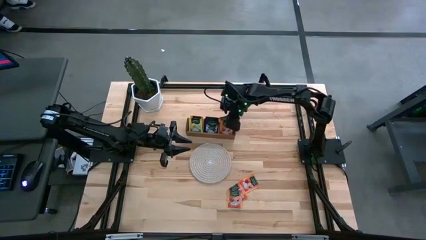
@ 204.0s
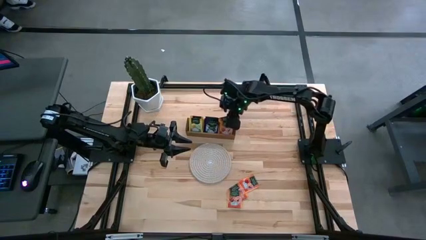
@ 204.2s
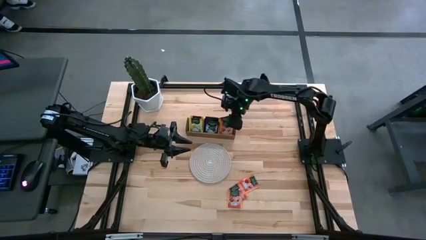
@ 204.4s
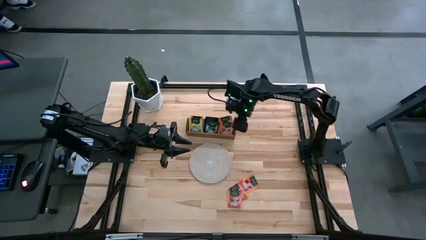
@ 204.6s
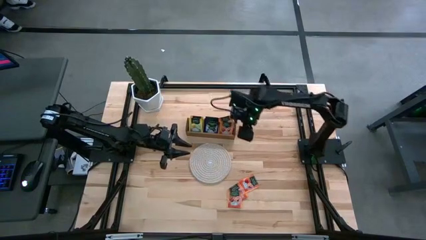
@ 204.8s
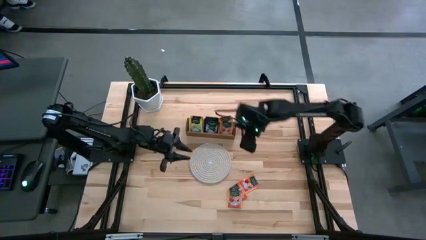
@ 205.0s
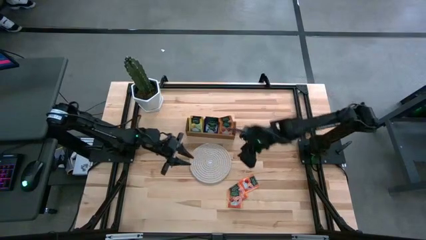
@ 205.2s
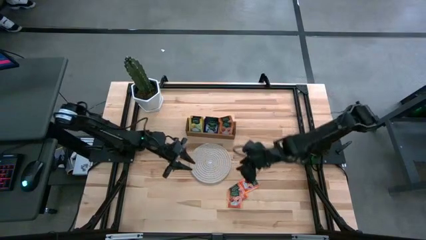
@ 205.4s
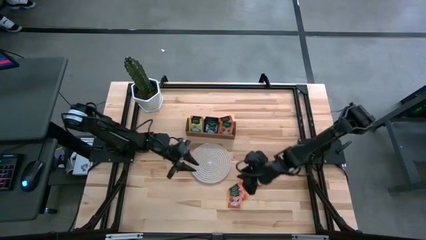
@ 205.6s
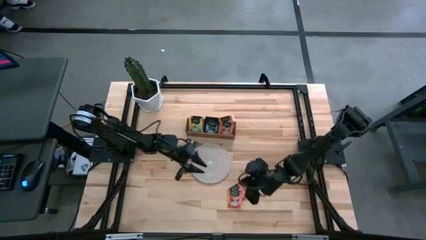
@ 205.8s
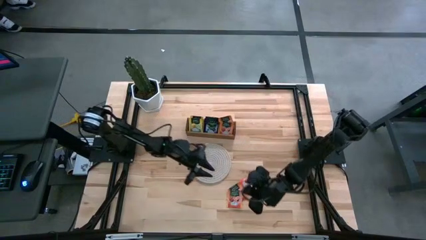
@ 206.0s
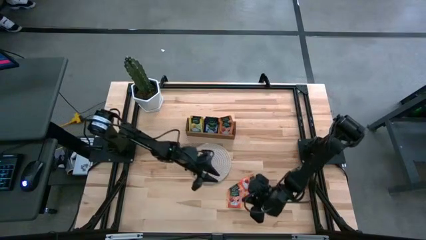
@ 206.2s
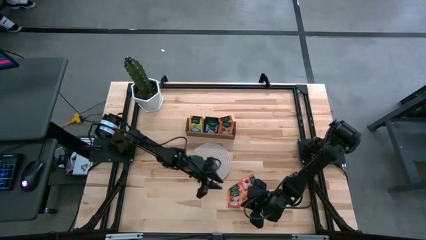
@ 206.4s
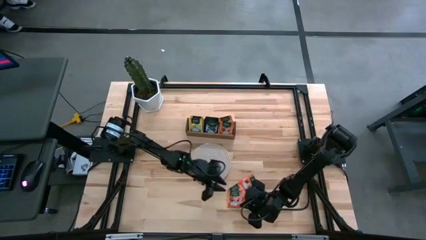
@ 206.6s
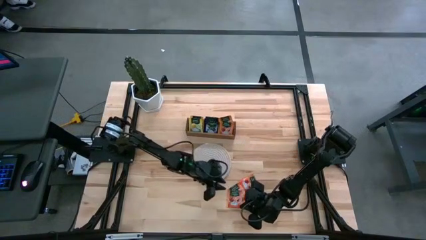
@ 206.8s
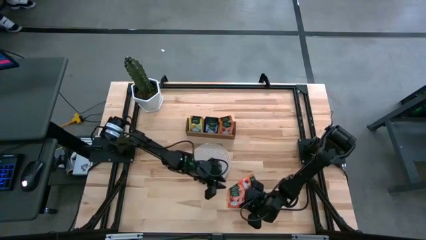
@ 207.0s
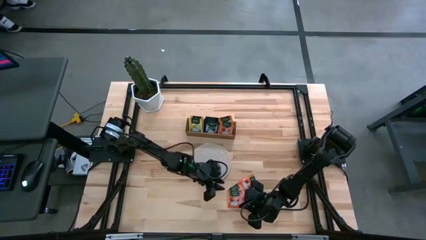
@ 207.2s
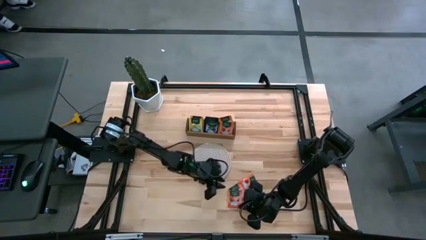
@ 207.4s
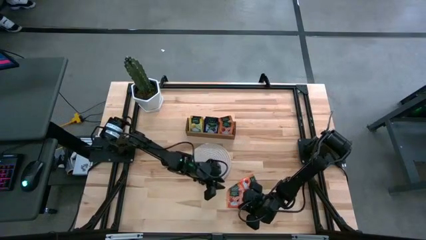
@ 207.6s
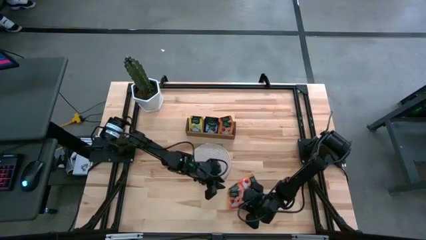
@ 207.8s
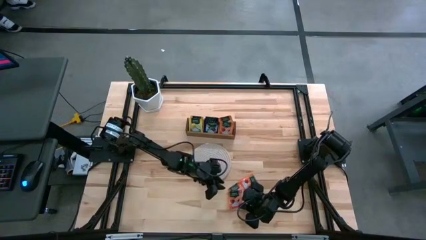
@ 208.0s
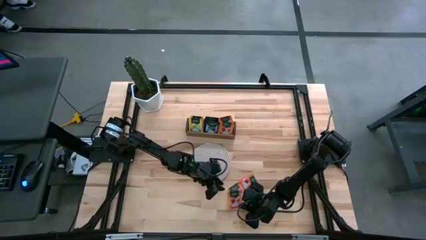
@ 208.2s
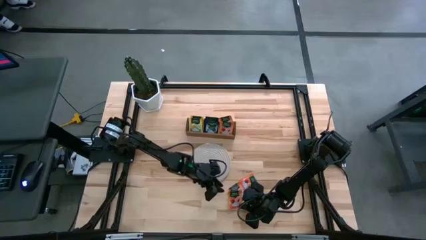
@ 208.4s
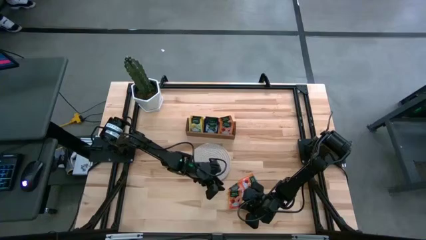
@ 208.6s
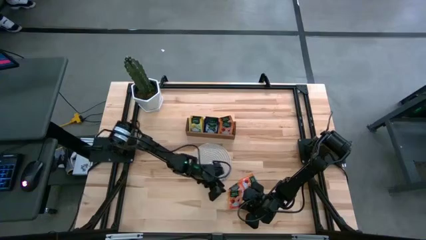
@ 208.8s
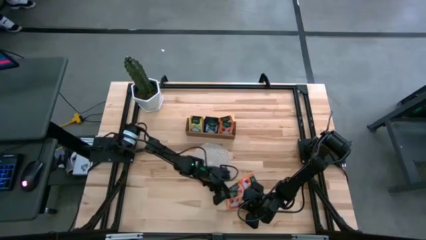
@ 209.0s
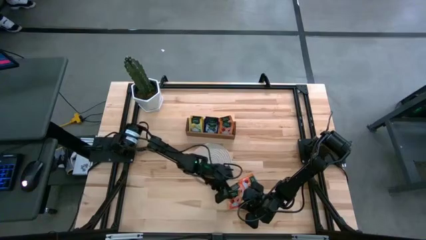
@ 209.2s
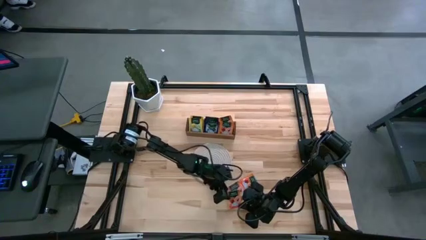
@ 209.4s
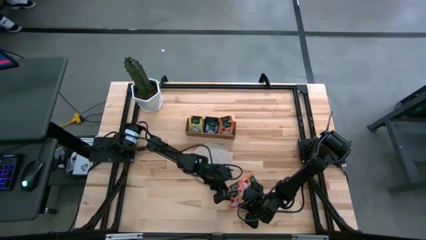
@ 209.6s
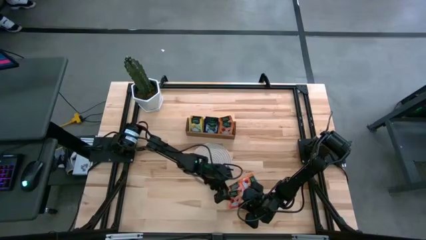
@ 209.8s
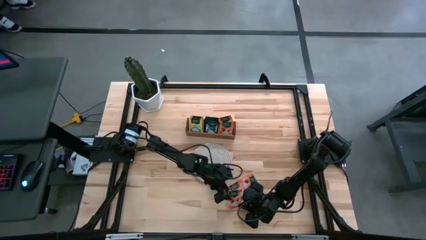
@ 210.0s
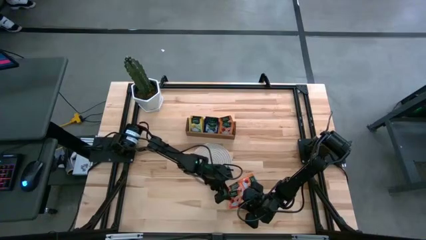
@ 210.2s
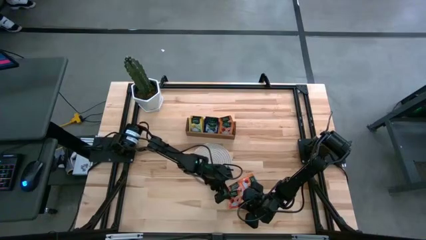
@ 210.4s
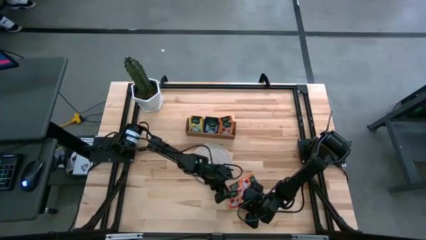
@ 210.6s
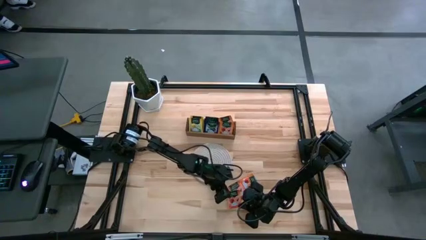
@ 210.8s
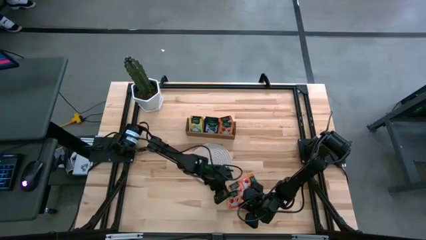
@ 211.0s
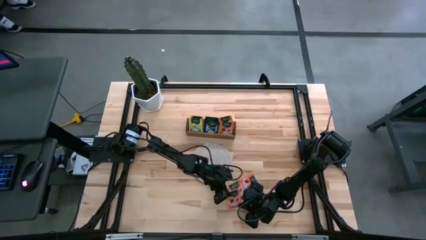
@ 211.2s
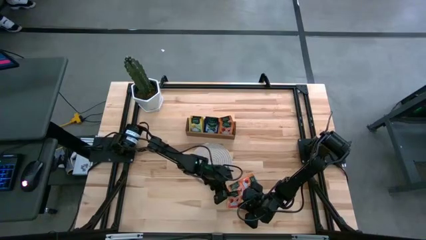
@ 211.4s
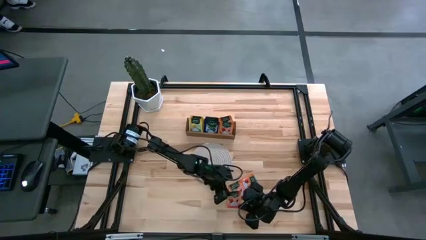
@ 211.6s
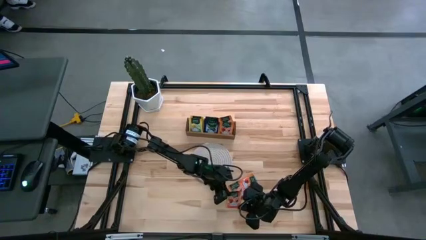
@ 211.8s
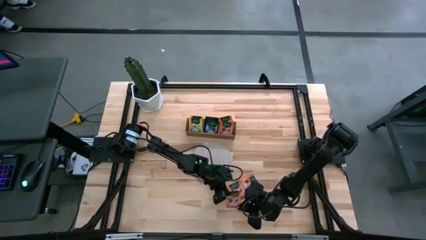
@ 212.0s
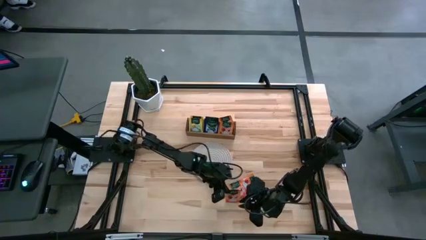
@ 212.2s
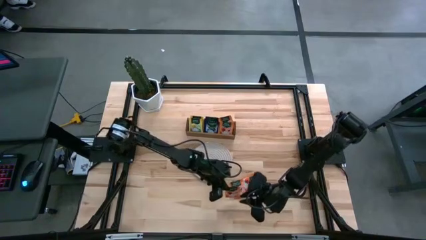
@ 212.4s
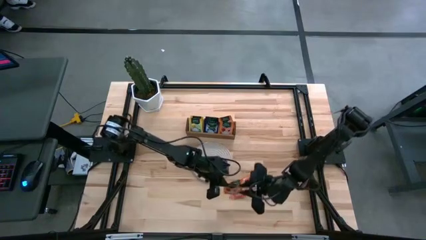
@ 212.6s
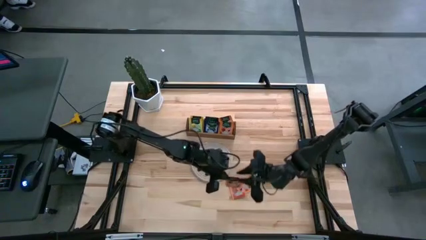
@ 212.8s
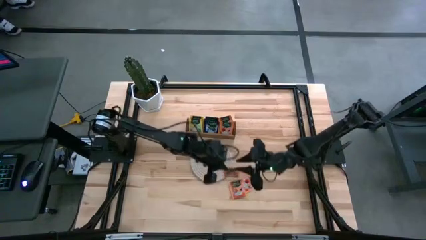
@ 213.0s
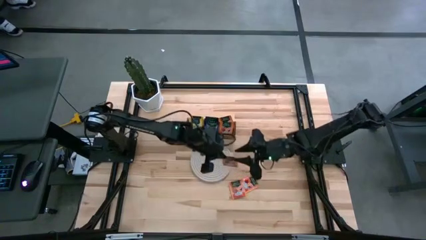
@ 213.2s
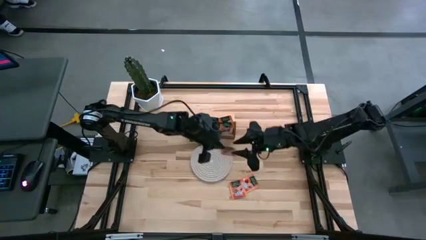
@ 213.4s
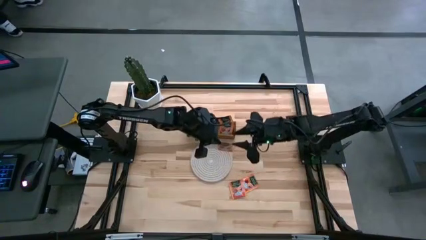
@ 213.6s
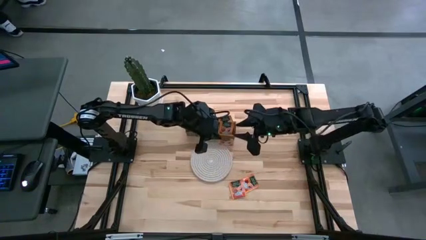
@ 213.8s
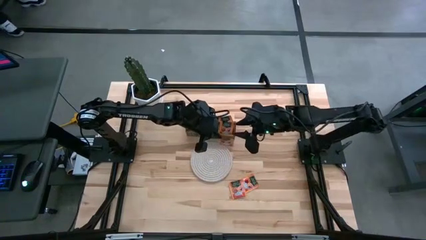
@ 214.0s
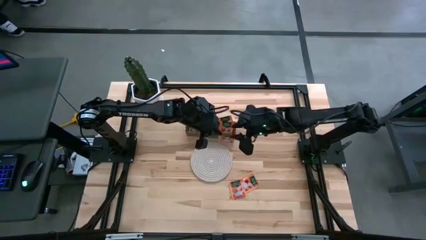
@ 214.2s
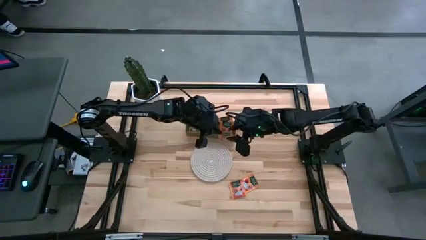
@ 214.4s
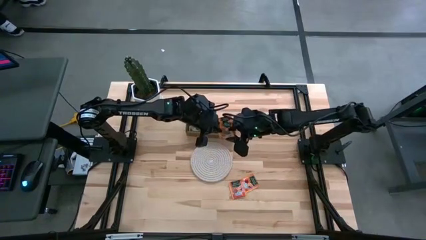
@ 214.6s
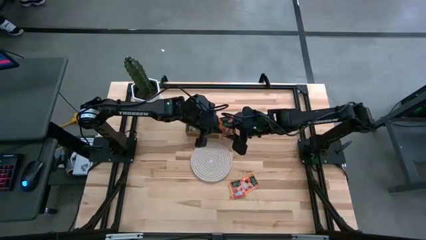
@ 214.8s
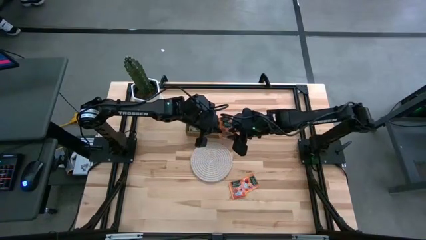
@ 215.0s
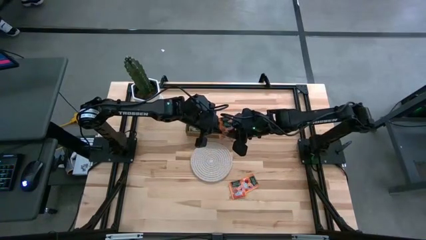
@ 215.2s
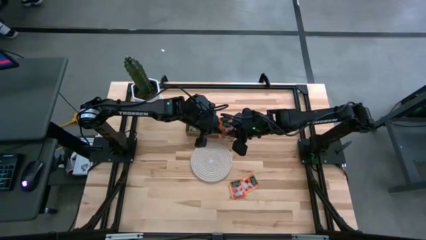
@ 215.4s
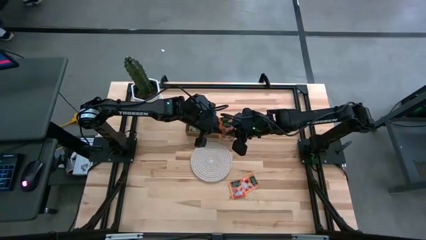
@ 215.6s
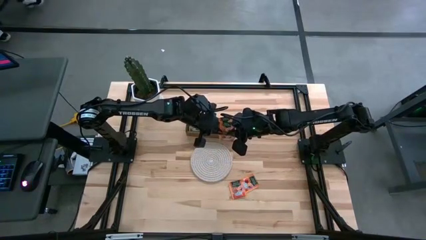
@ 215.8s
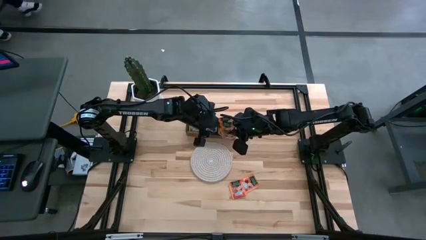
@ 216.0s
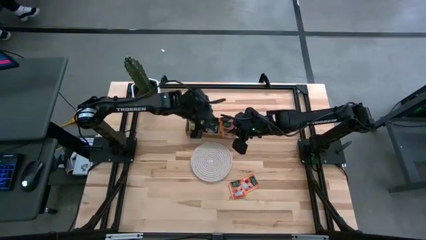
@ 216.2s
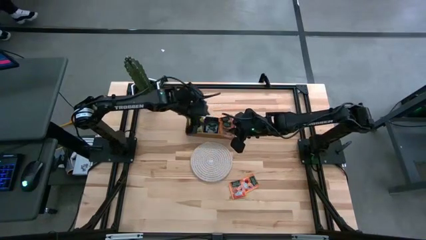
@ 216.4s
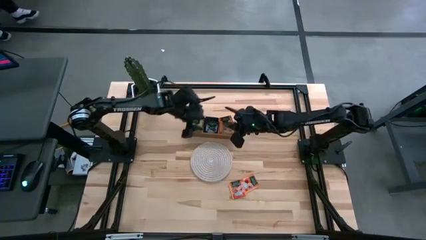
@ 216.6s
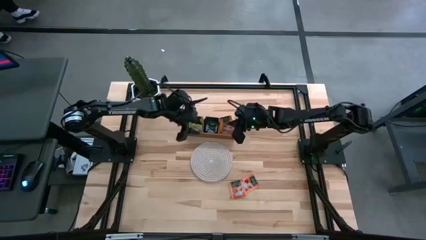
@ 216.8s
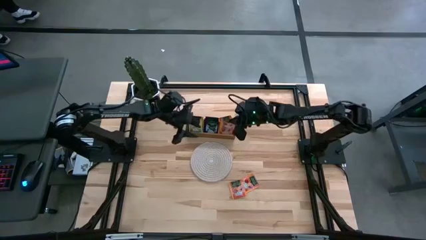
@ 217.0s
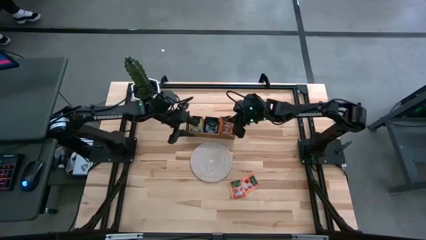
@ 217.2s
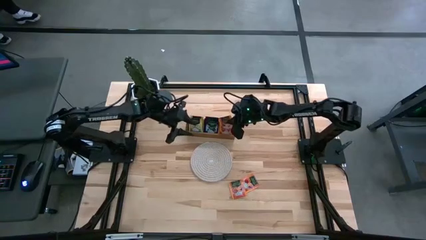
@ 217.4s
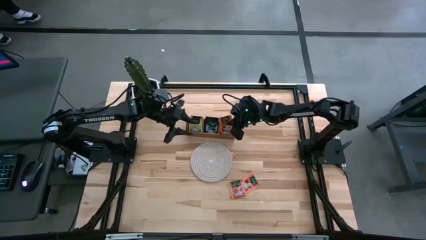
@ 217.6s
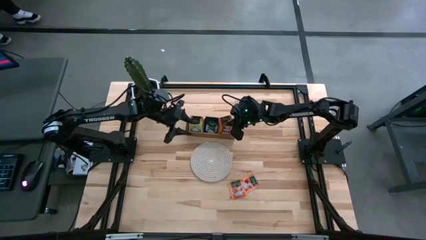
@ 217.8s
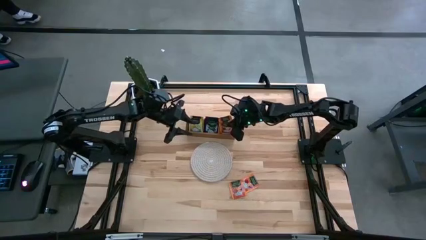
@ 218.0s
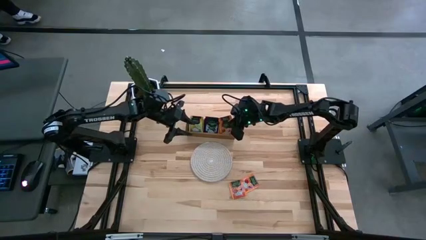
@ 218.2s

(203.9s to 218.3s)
Task: Pick & Place Tea
Put the orange tea bag into the right section of the wooden organizer

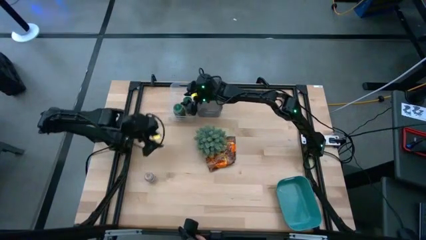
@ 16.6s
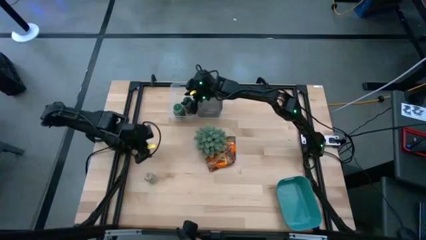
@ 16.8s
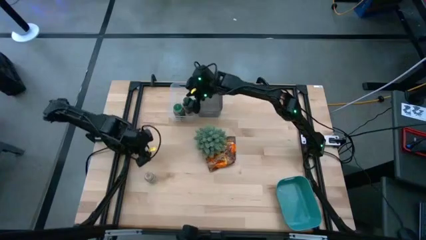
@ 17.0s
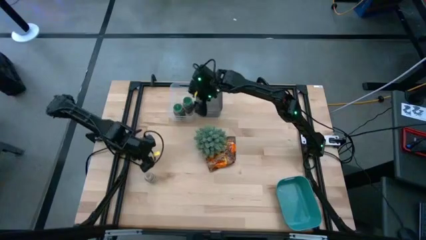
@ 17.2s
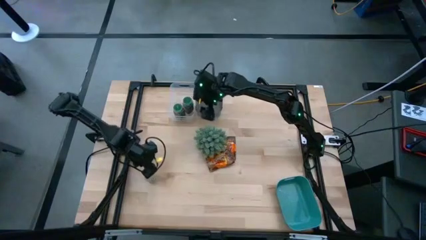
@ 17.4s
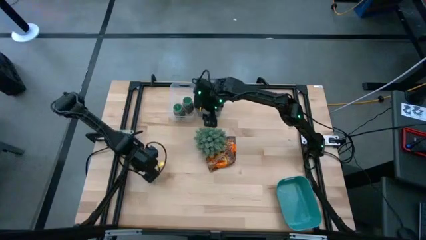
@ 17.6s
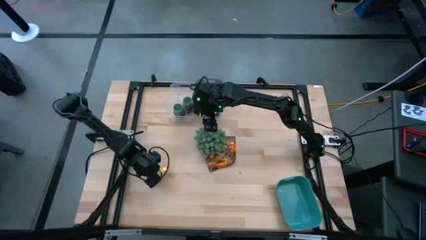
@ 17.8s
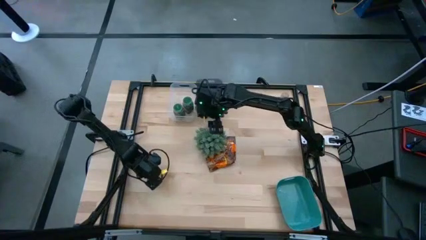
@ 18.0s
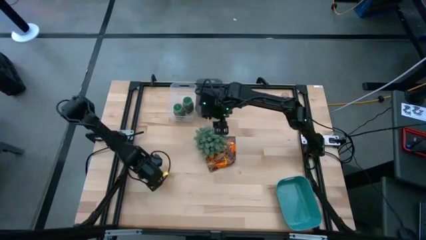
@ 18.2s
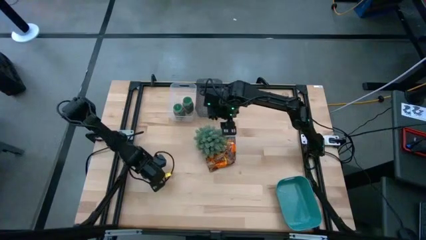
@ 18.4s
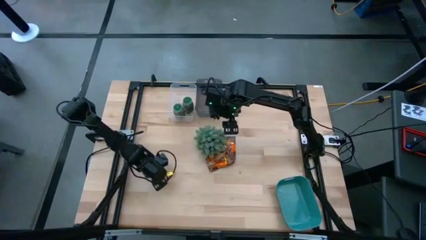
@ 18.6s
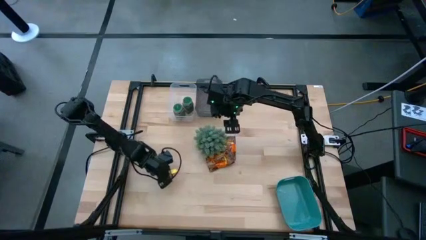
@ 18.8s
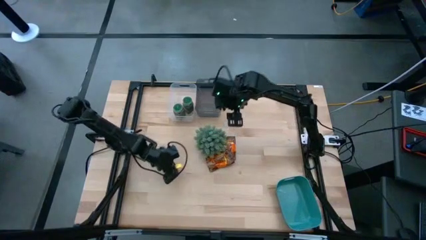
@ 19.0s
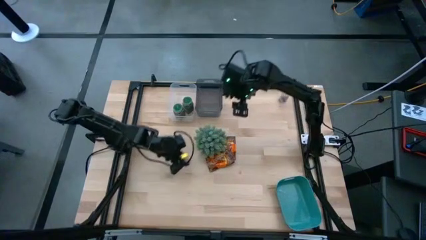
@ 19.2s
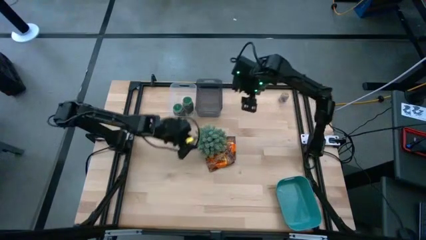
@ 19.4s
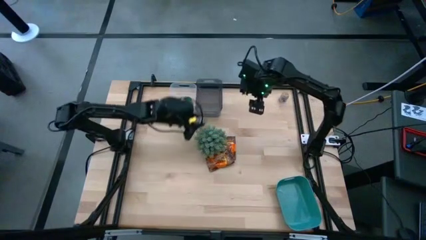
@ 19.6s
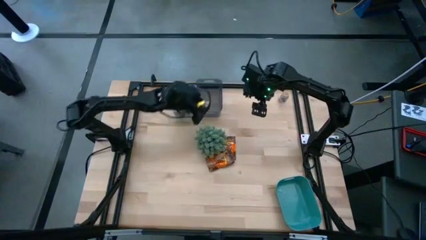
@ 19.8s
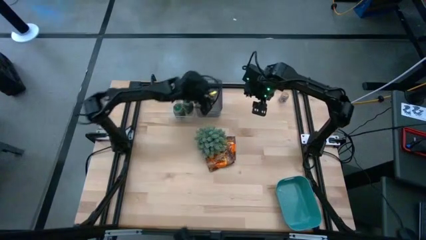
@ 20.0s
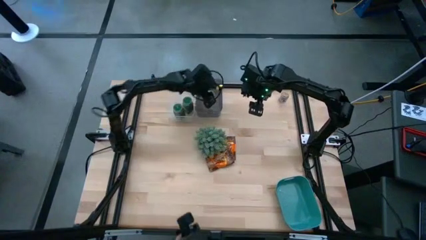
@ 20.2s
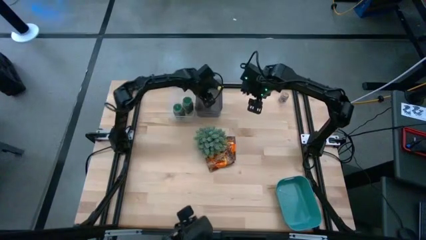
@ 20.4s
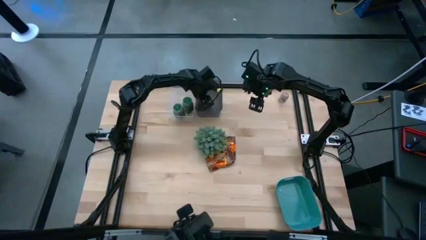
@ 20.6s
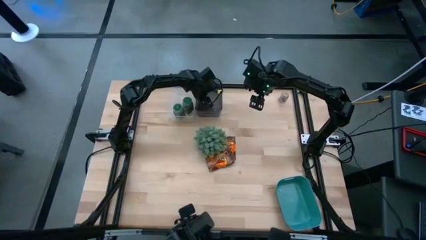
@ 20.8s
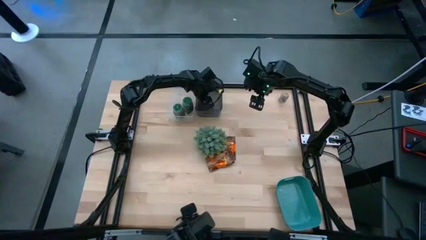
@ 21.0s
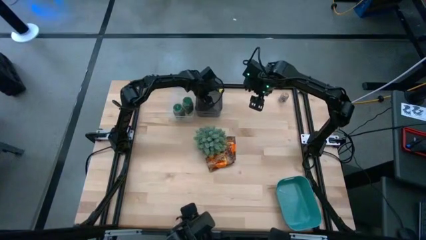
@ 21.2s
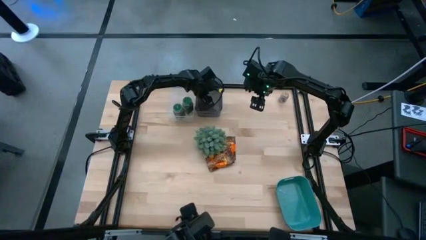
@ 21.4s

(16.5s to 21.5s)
Task: Sort spices by type
Put the bottom left white bottled seasoning into the black transparent bin
